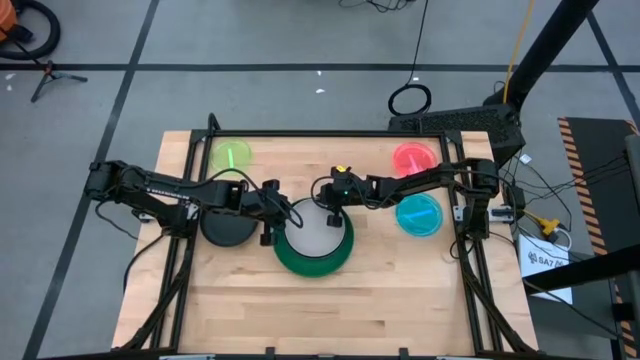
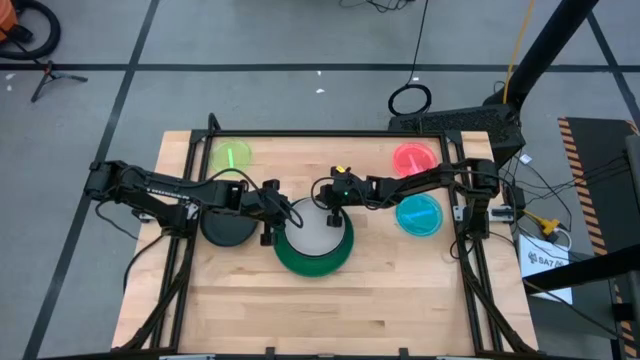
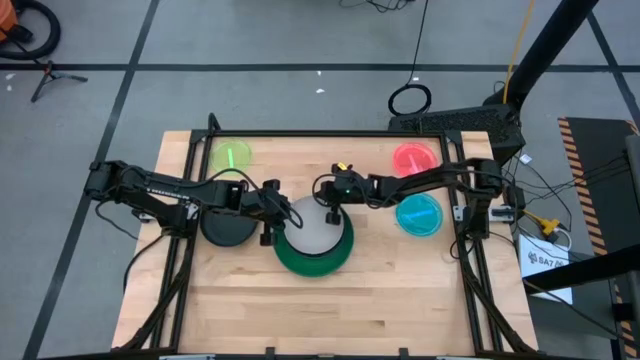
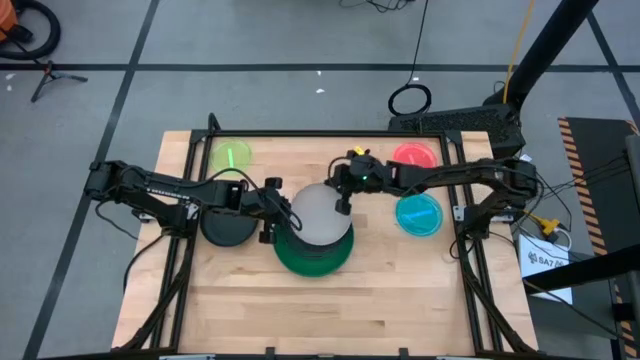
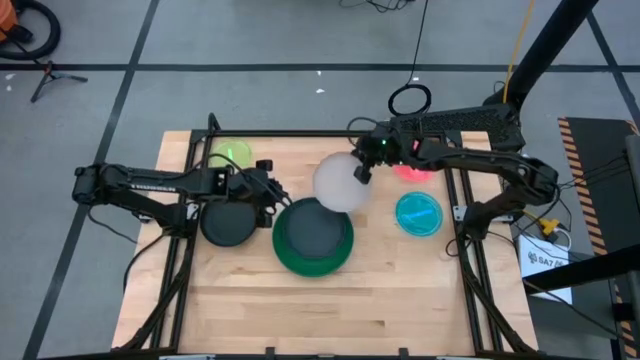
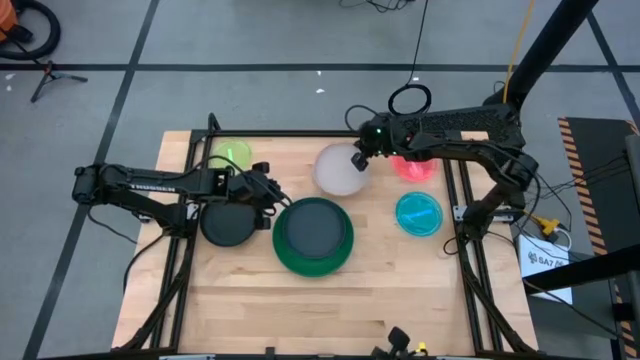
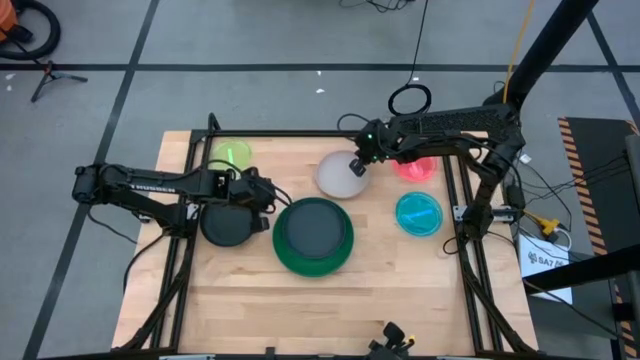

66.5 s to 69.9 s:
Task: Stack plastic plates
Remove the white plate from the stacked plates

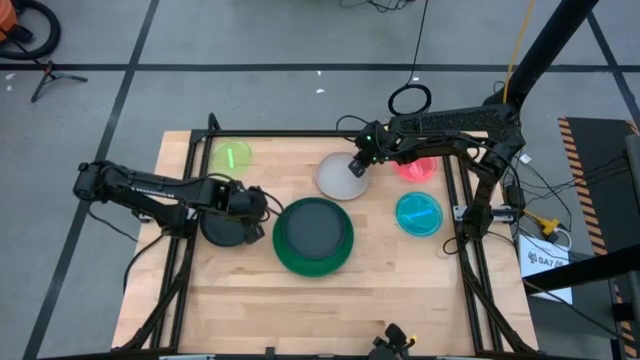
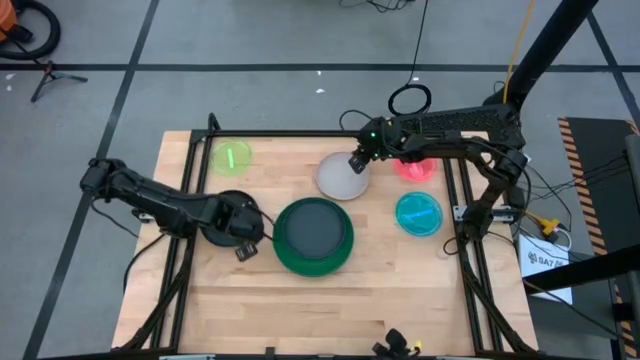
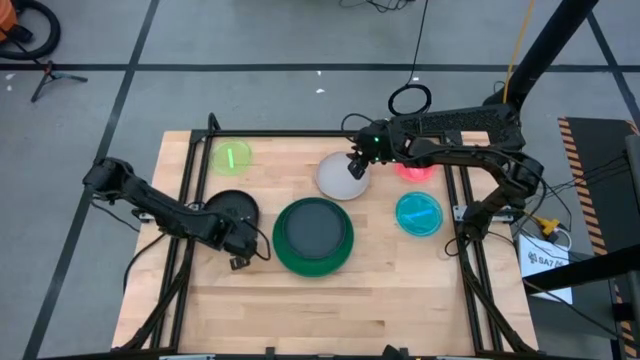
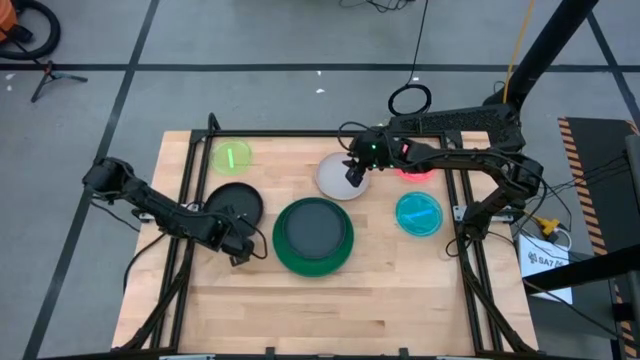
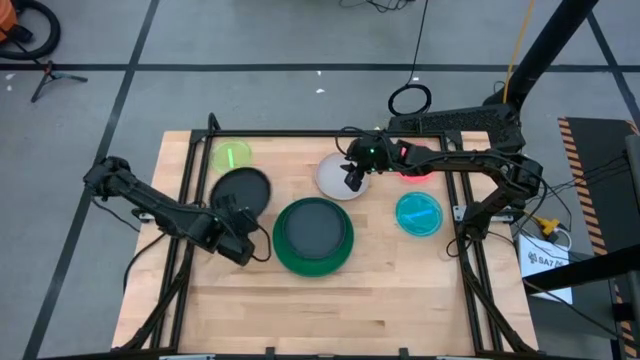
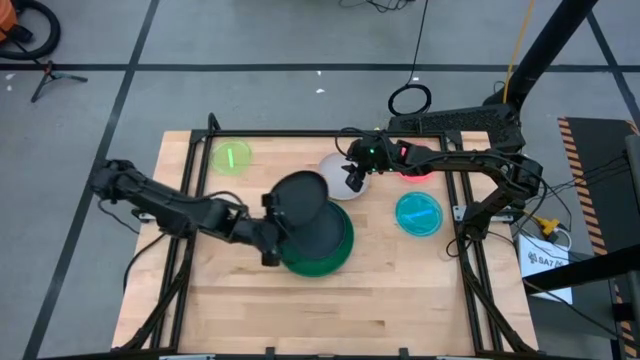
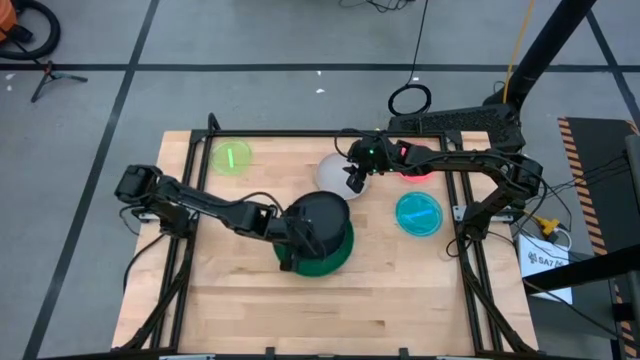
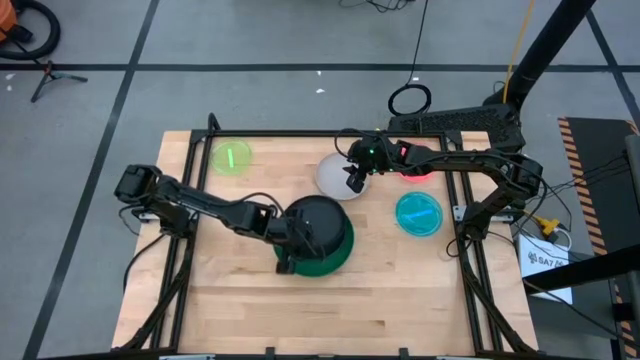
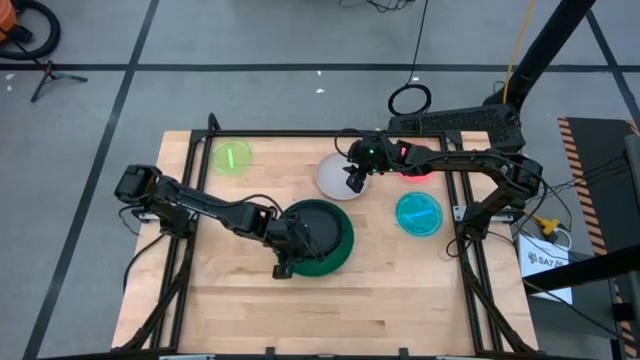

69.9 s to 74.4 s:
Stack the black plate on top of the other black plate

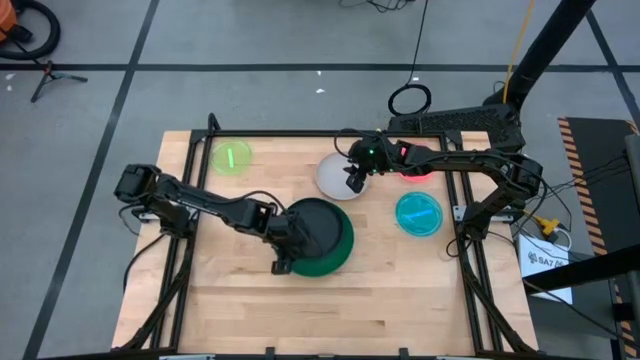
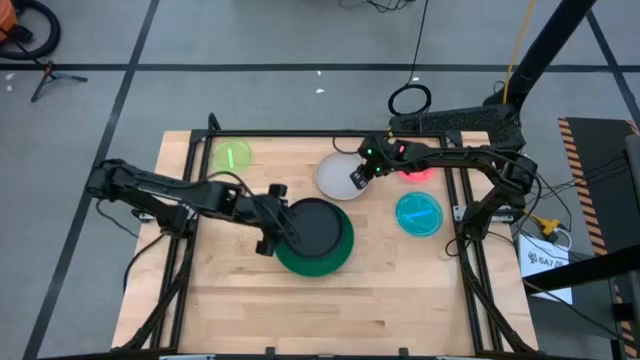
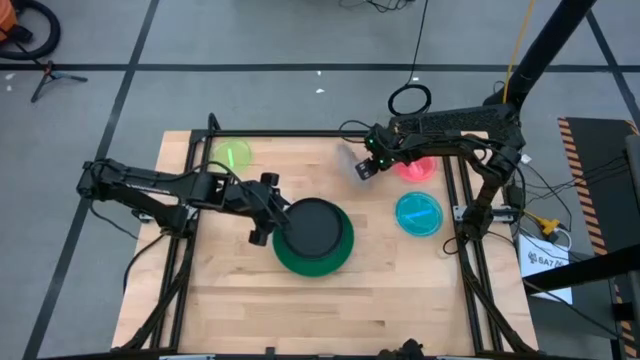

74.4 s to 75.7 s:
Stack the white plate on top of the black plate

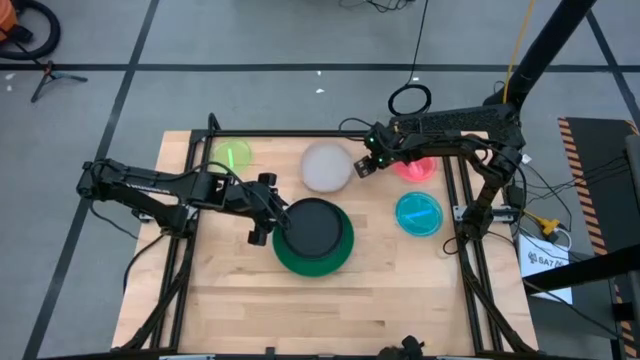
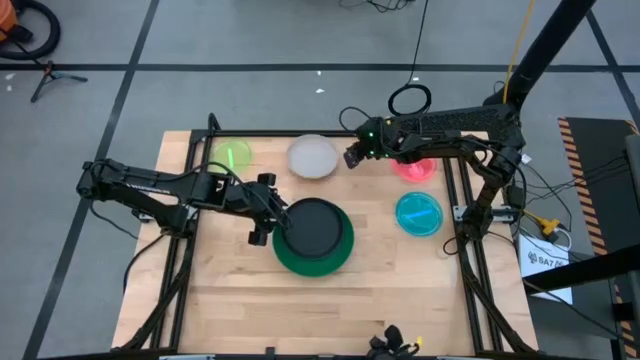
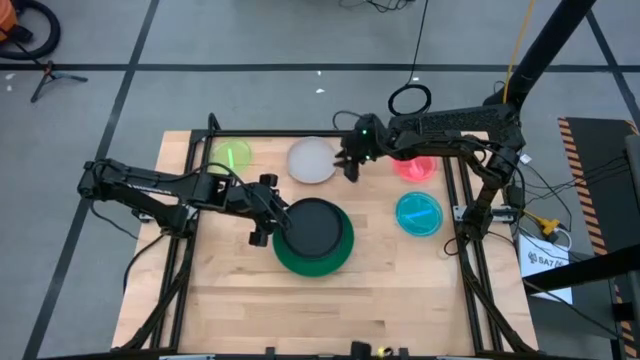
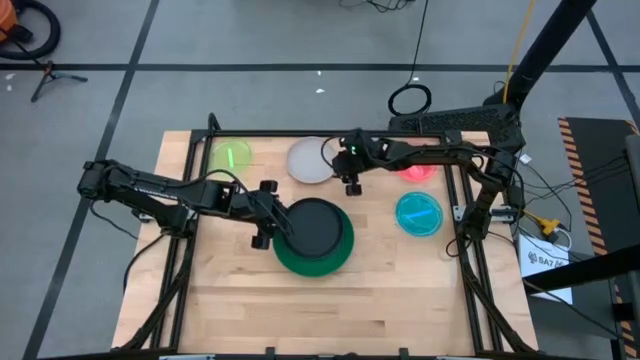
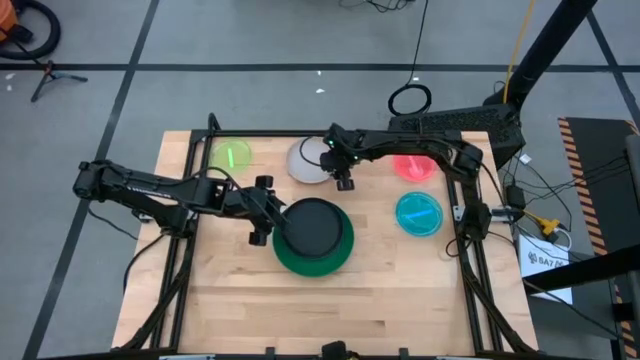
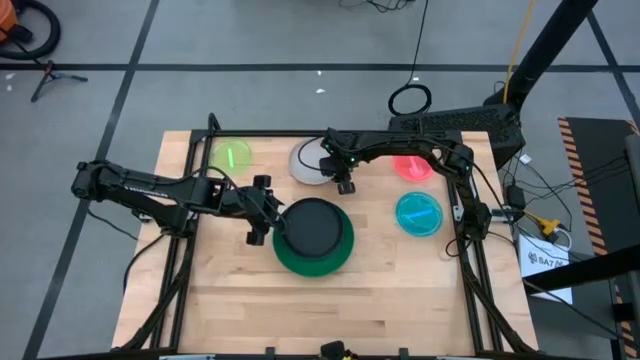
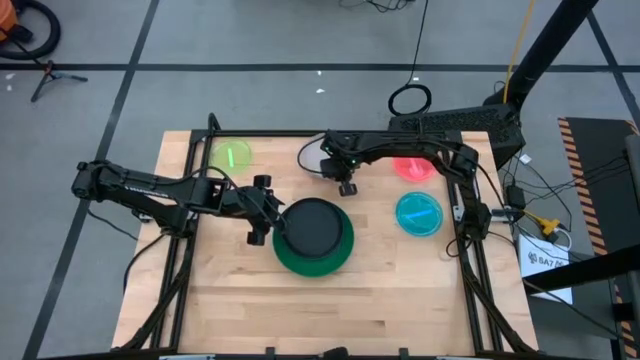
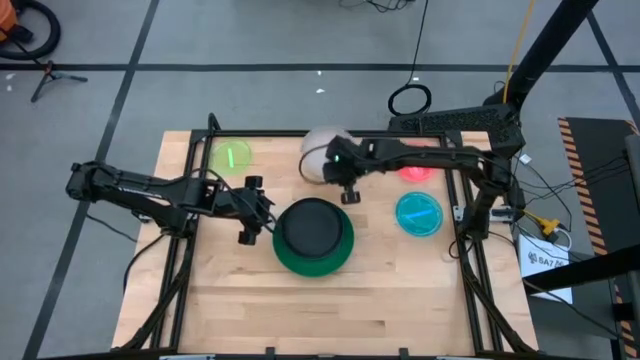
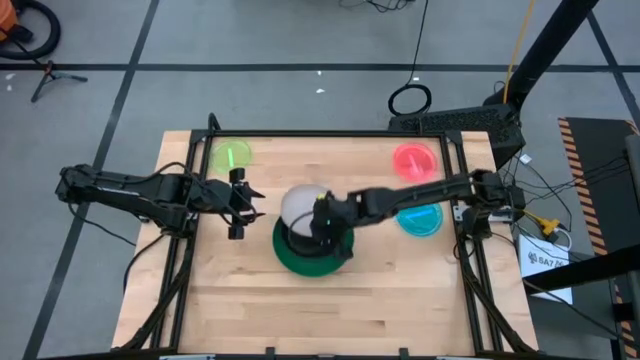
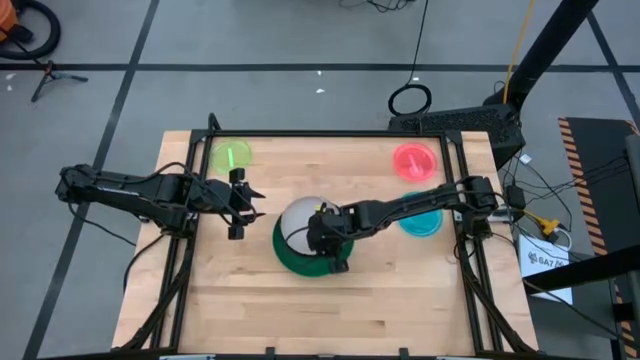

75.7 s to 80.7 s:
Stack the white plate on top of the black plate

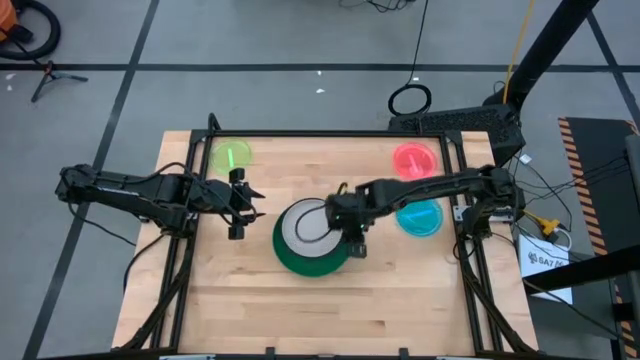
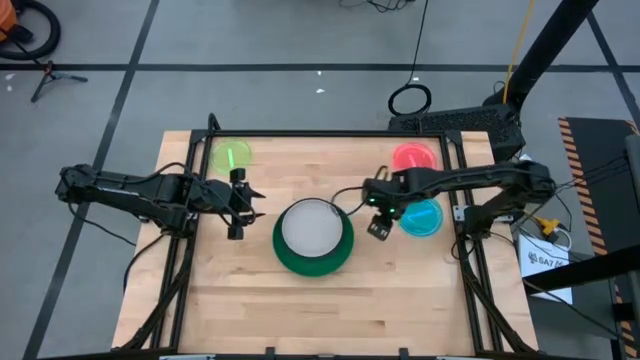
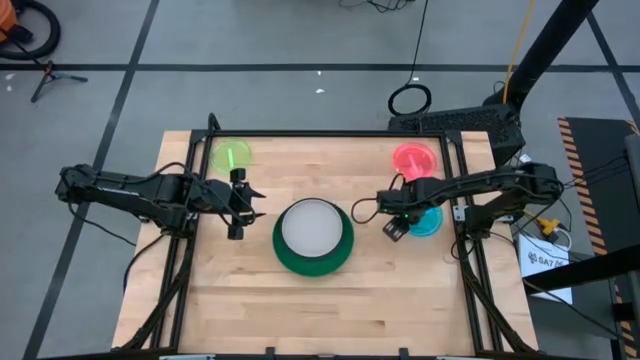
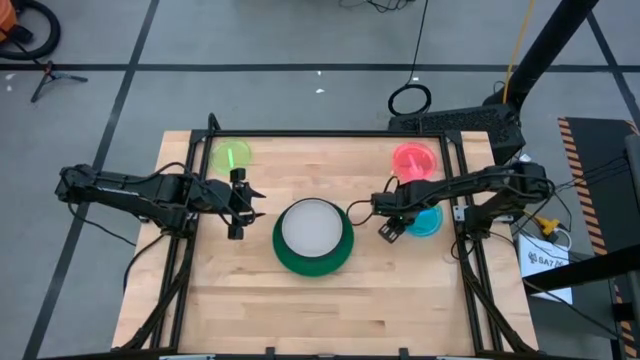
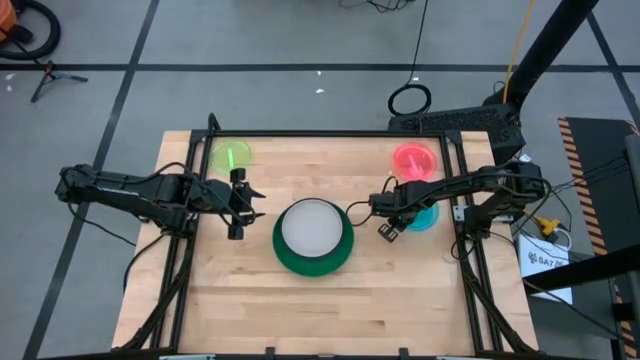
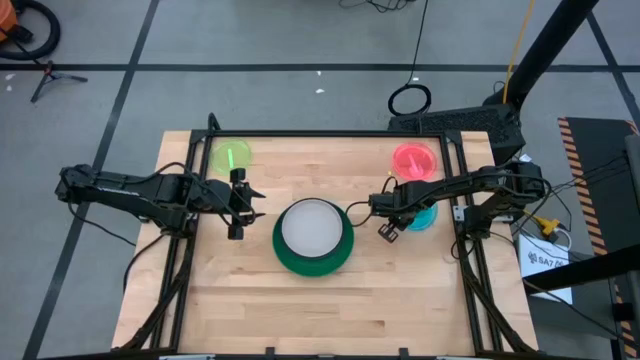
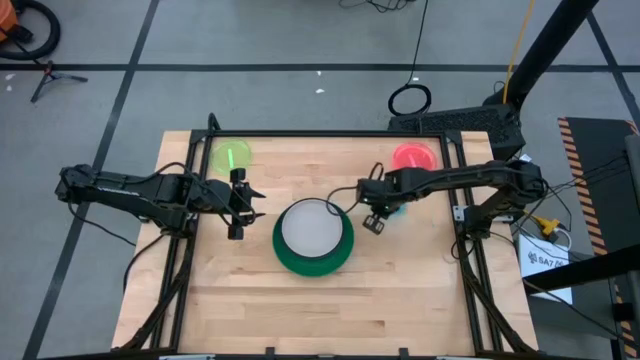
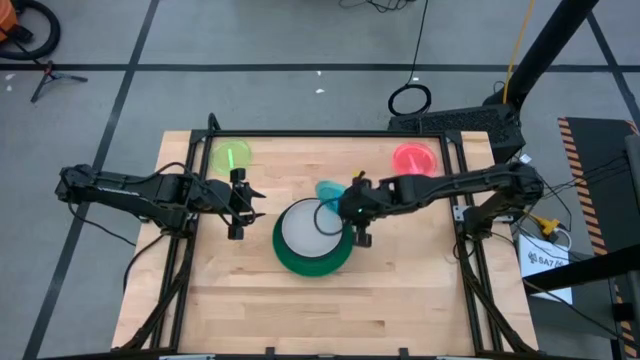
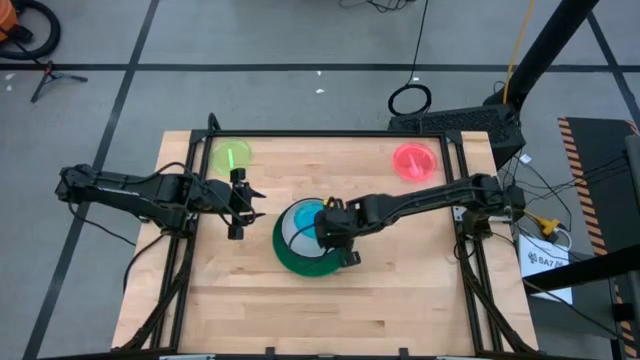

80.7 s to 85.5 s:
Stack the blue plate on top of the white plate

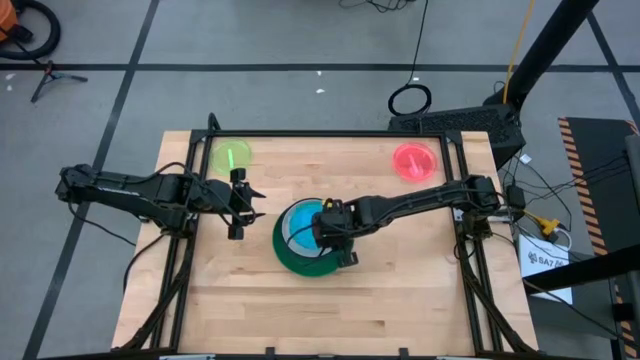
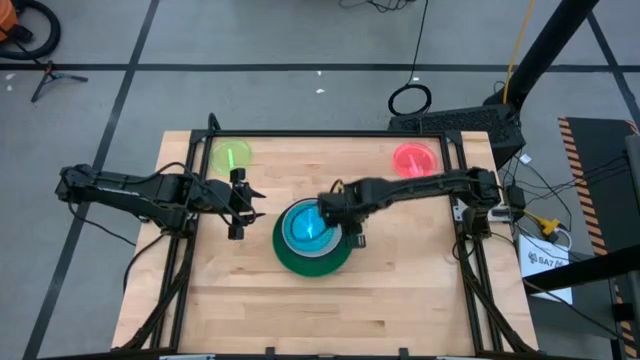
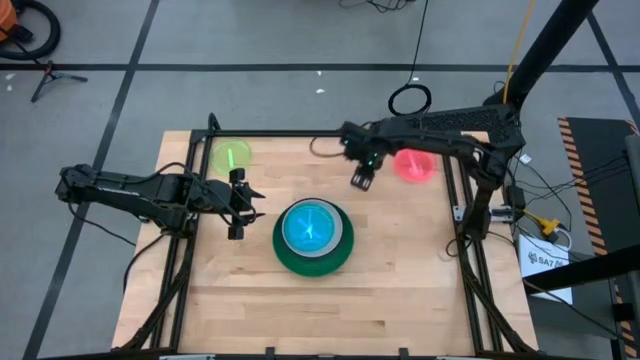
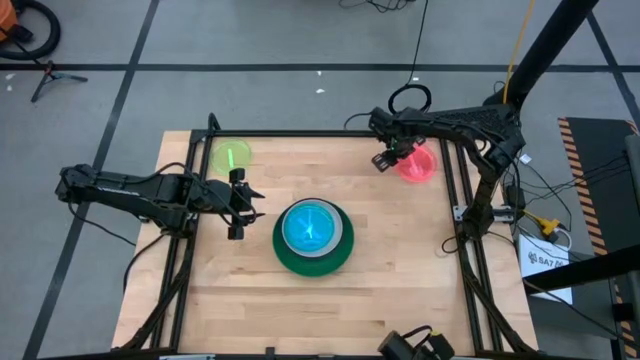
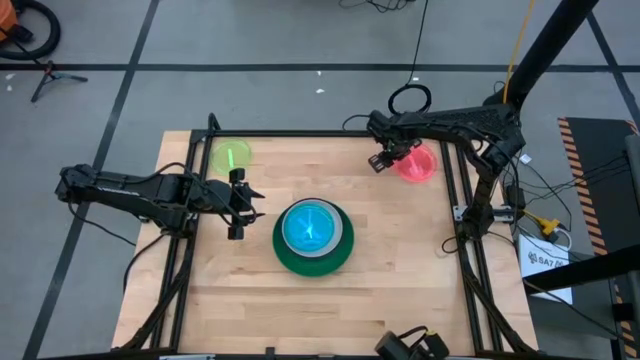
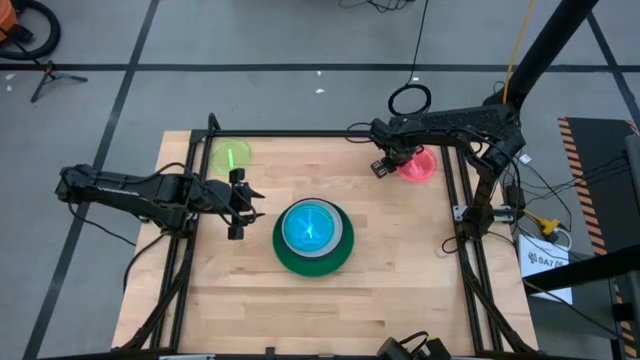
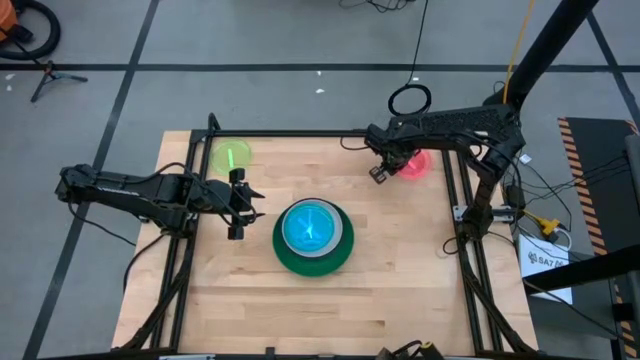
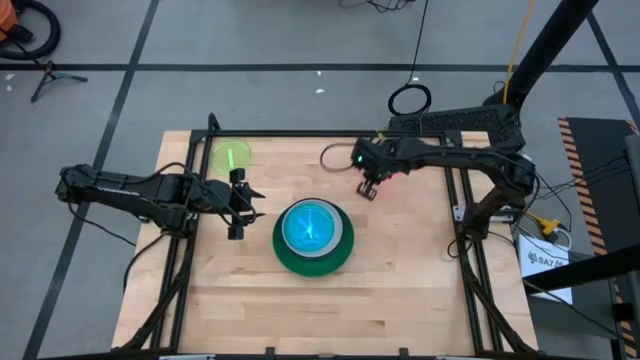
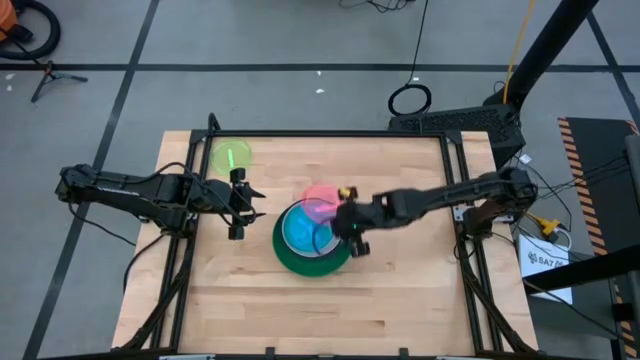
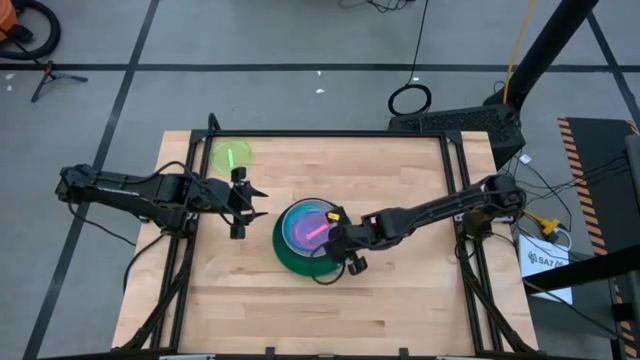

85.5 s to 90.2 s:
Stack the pink plate on top of the blue plate
